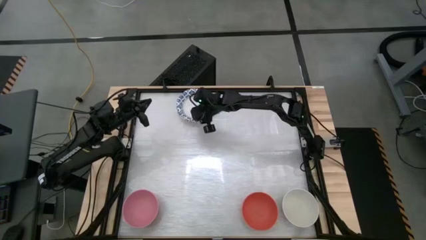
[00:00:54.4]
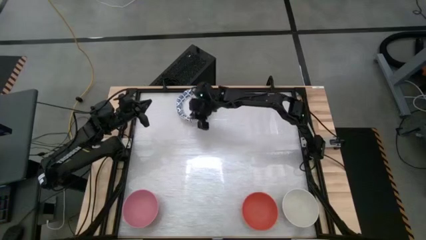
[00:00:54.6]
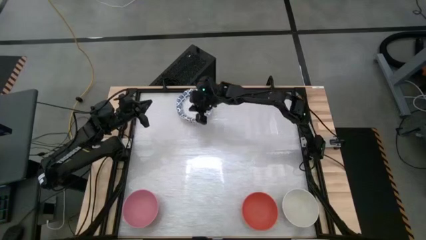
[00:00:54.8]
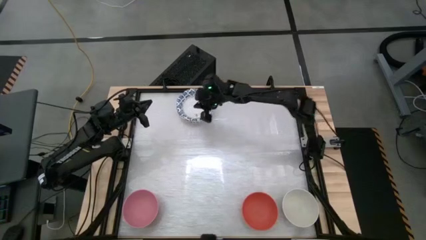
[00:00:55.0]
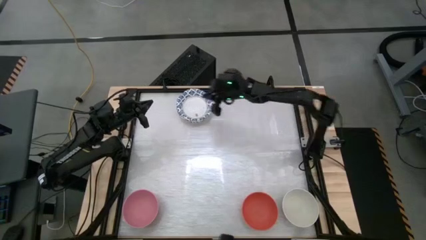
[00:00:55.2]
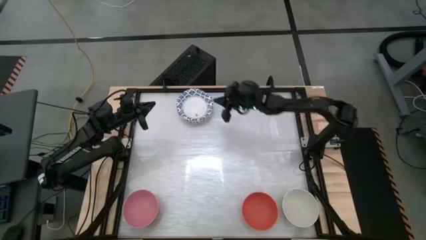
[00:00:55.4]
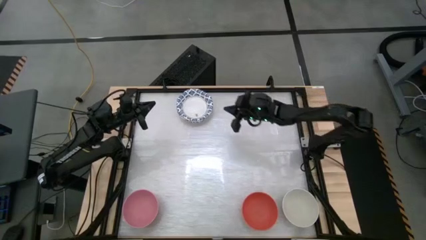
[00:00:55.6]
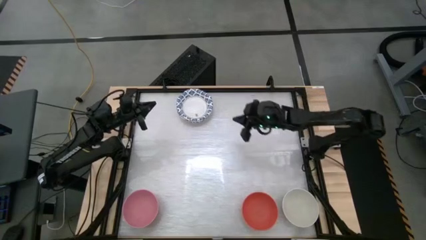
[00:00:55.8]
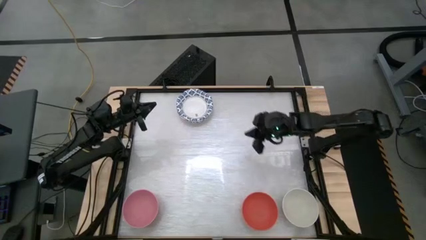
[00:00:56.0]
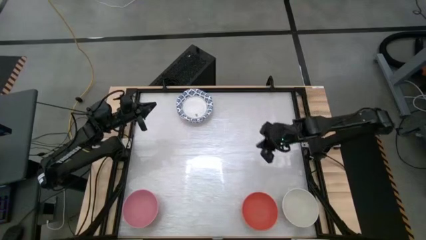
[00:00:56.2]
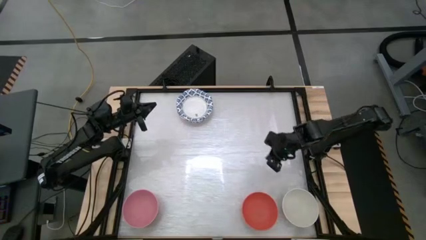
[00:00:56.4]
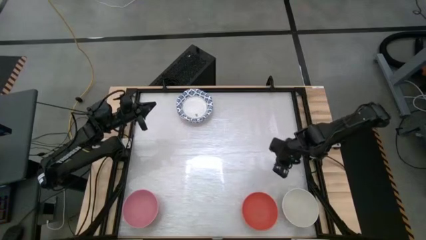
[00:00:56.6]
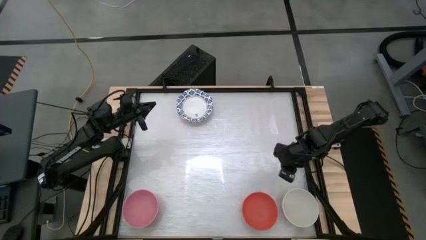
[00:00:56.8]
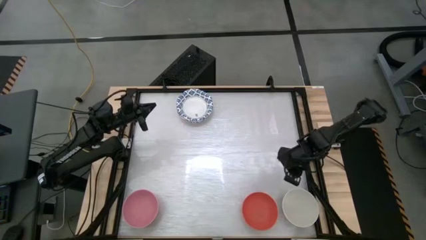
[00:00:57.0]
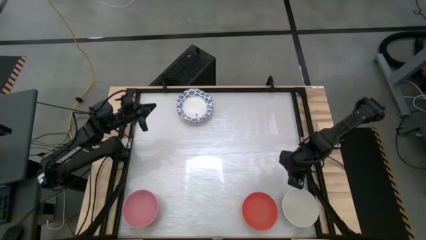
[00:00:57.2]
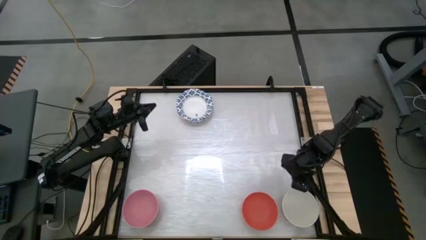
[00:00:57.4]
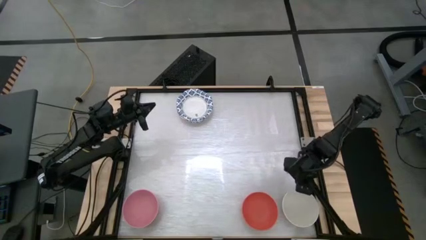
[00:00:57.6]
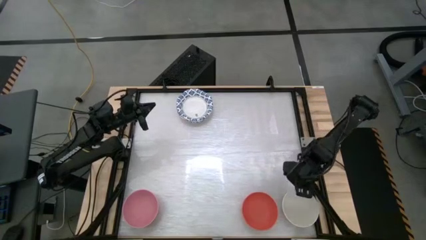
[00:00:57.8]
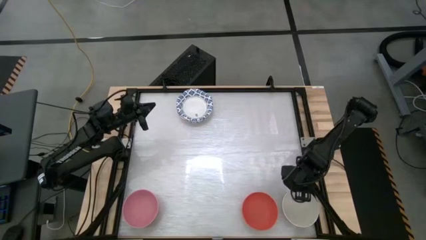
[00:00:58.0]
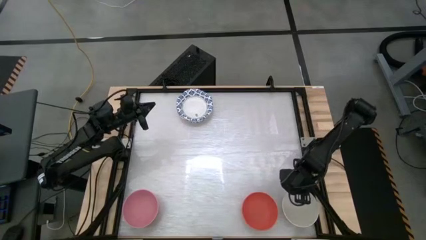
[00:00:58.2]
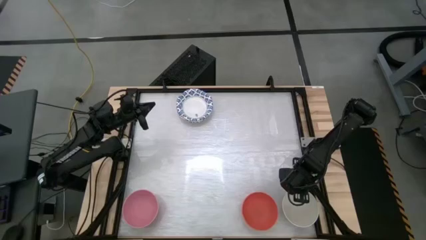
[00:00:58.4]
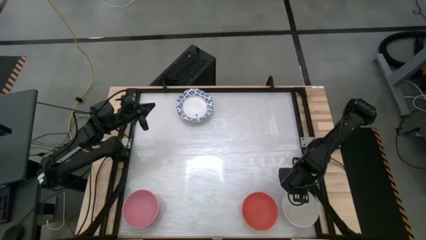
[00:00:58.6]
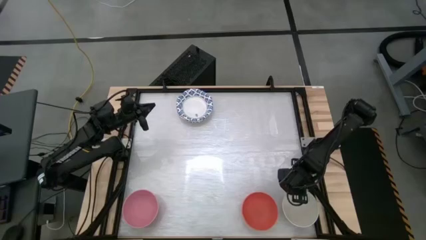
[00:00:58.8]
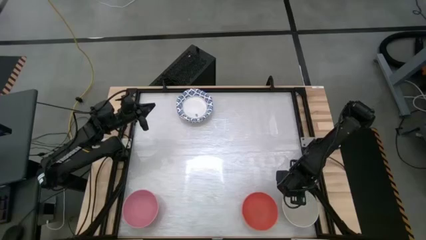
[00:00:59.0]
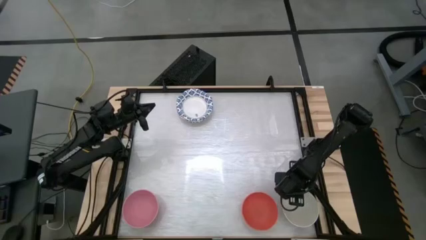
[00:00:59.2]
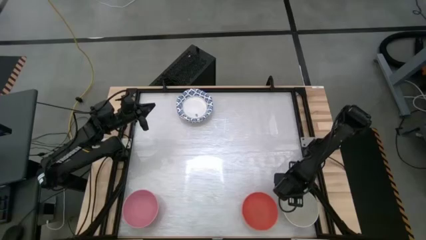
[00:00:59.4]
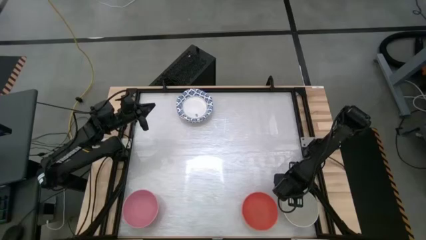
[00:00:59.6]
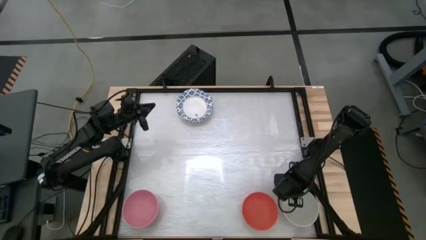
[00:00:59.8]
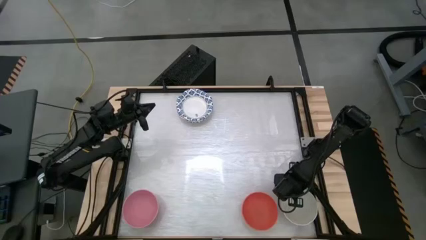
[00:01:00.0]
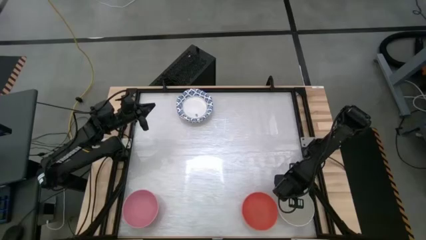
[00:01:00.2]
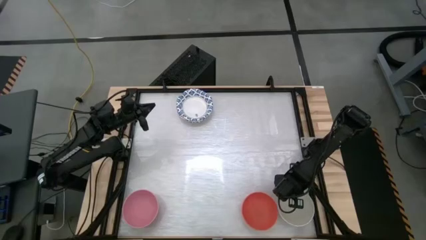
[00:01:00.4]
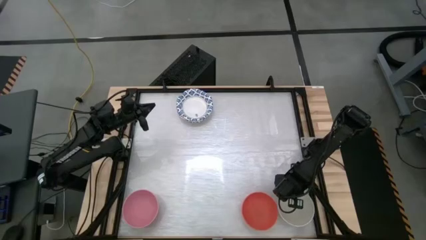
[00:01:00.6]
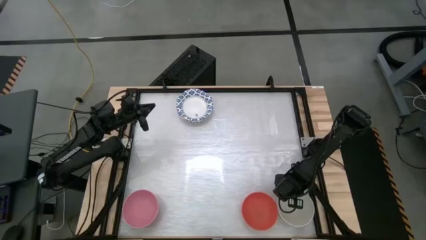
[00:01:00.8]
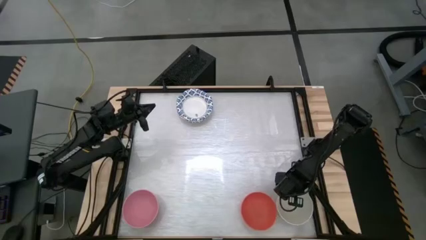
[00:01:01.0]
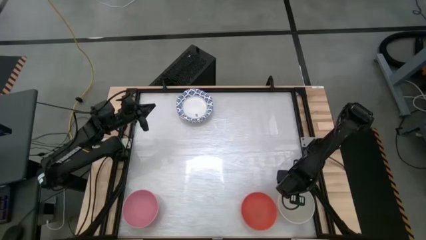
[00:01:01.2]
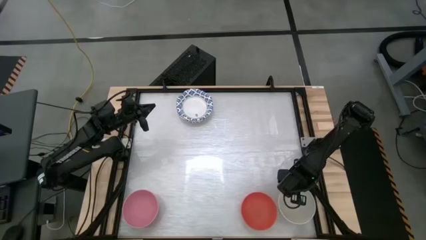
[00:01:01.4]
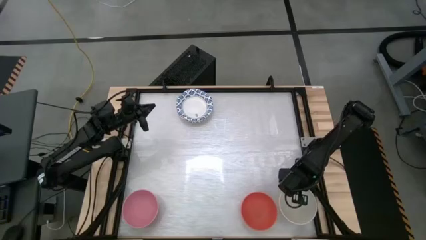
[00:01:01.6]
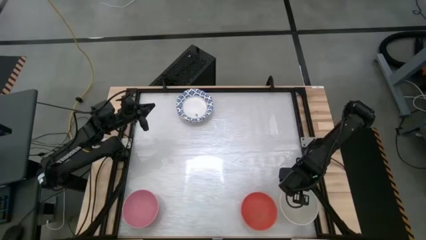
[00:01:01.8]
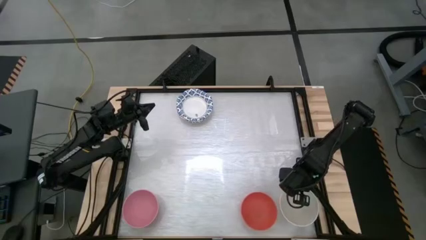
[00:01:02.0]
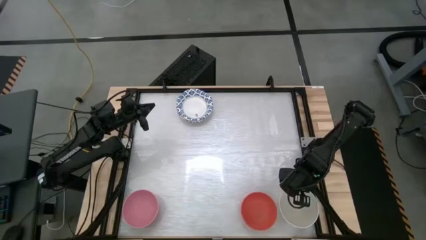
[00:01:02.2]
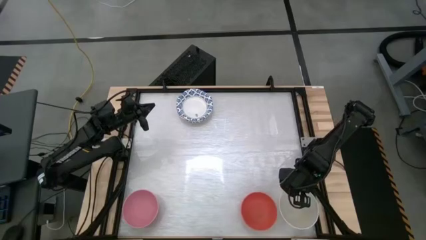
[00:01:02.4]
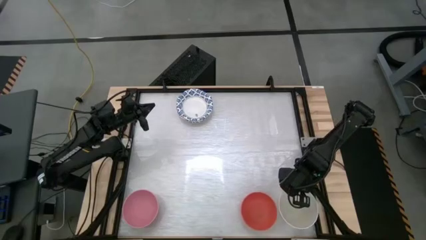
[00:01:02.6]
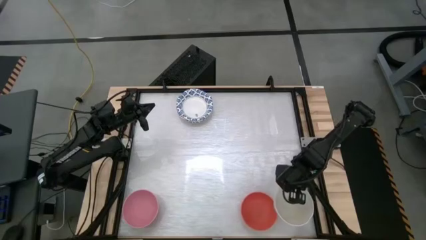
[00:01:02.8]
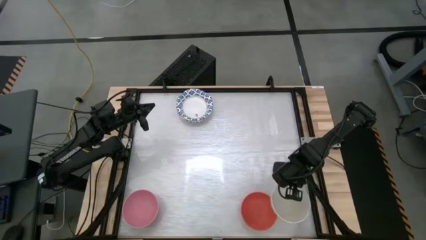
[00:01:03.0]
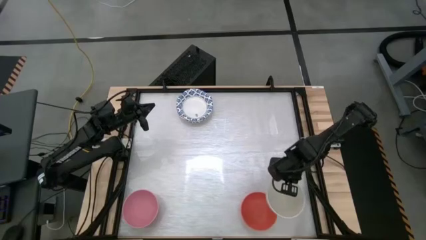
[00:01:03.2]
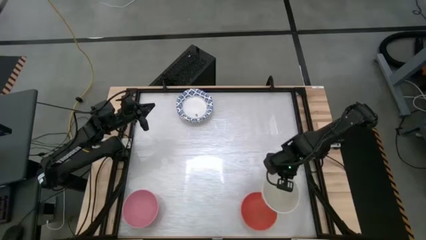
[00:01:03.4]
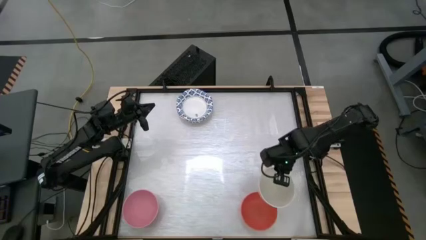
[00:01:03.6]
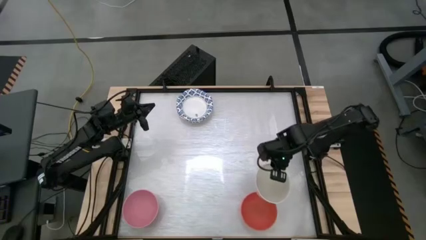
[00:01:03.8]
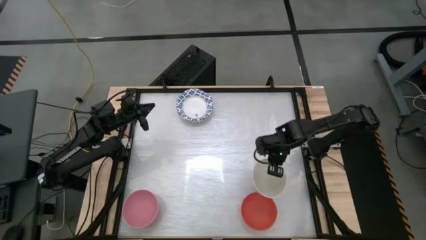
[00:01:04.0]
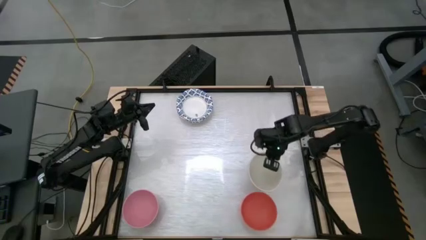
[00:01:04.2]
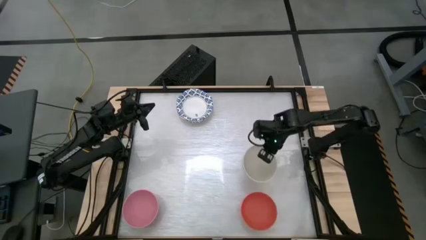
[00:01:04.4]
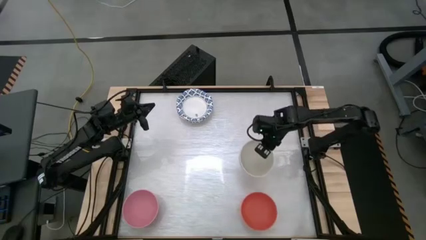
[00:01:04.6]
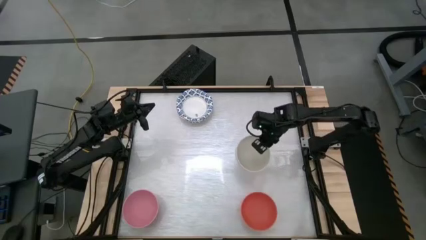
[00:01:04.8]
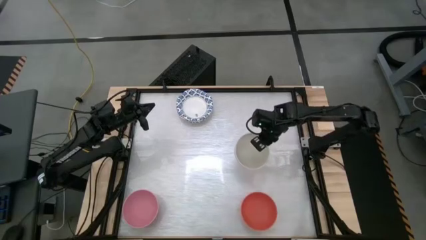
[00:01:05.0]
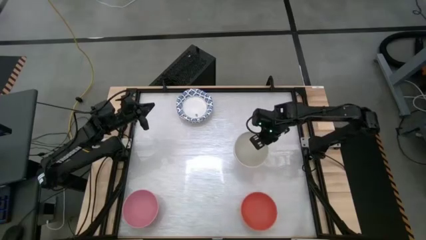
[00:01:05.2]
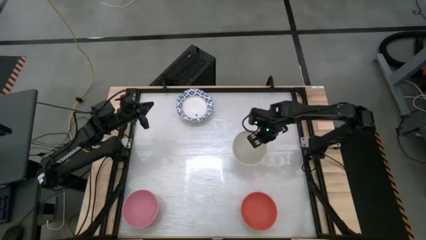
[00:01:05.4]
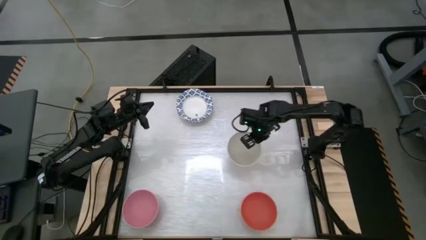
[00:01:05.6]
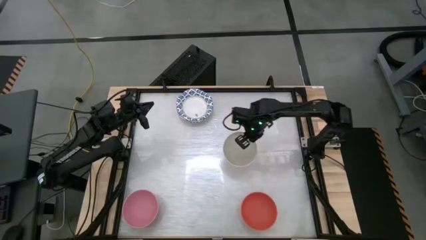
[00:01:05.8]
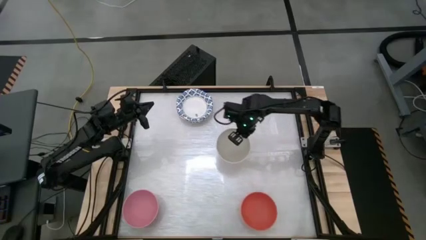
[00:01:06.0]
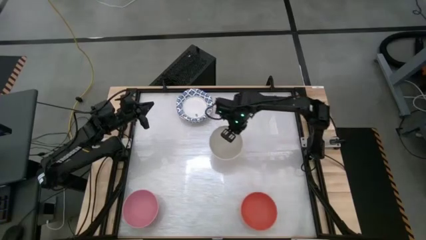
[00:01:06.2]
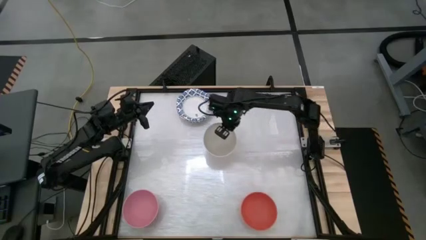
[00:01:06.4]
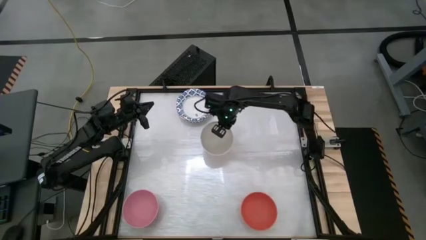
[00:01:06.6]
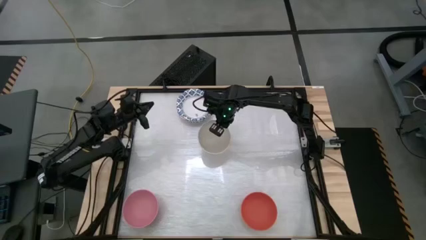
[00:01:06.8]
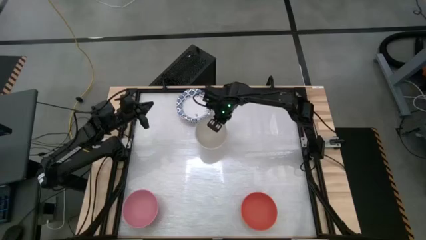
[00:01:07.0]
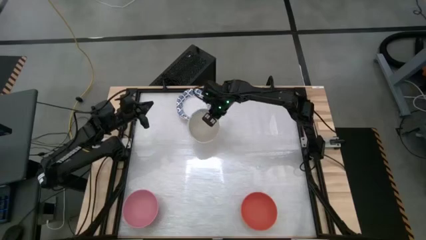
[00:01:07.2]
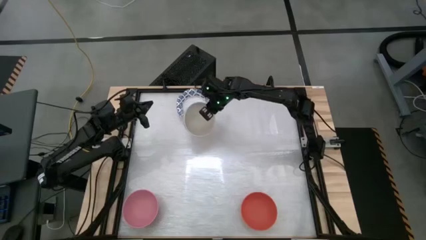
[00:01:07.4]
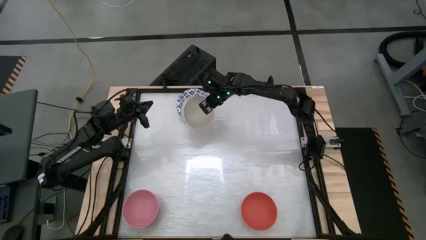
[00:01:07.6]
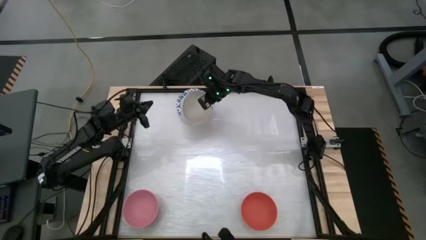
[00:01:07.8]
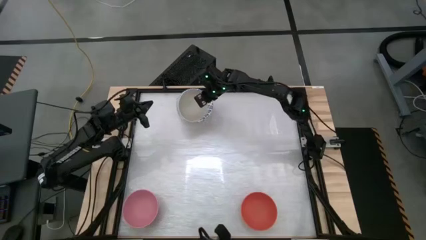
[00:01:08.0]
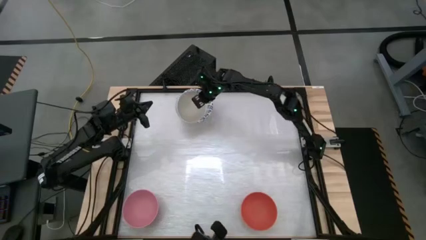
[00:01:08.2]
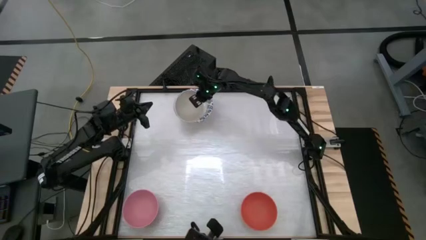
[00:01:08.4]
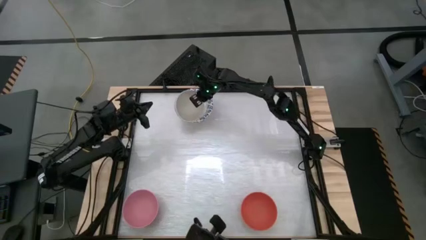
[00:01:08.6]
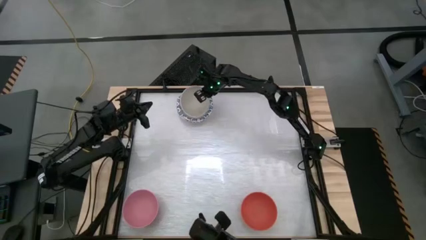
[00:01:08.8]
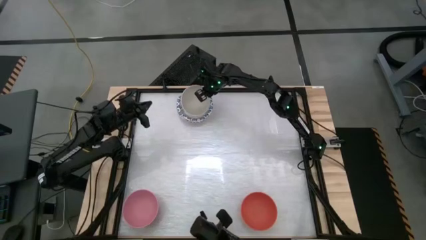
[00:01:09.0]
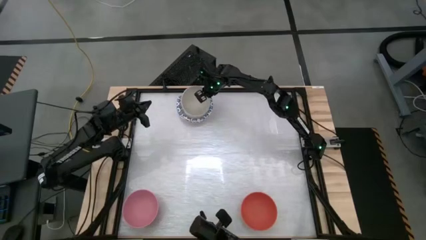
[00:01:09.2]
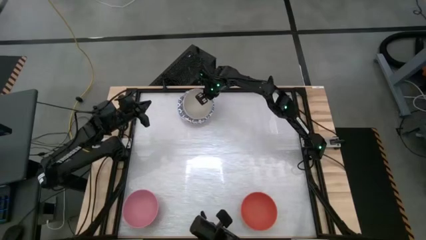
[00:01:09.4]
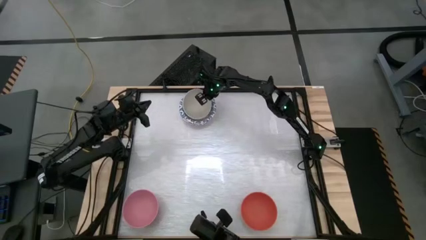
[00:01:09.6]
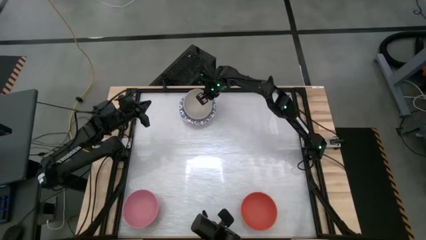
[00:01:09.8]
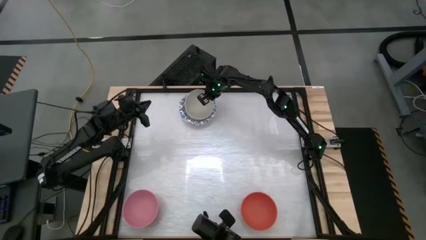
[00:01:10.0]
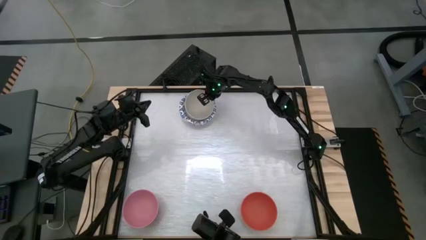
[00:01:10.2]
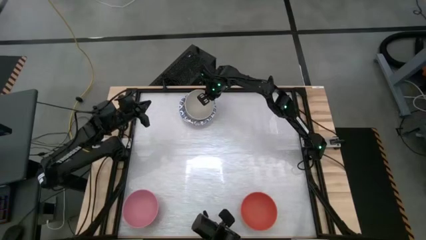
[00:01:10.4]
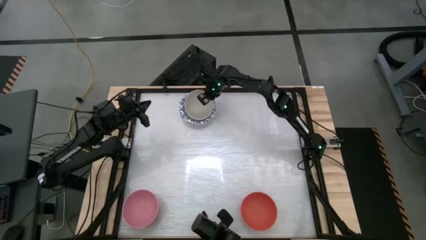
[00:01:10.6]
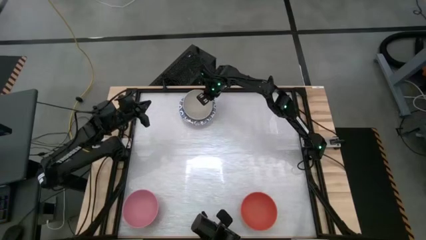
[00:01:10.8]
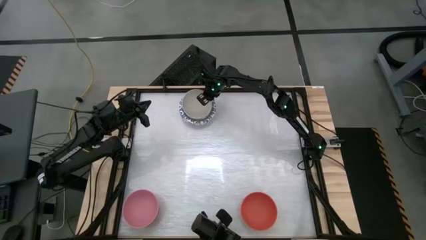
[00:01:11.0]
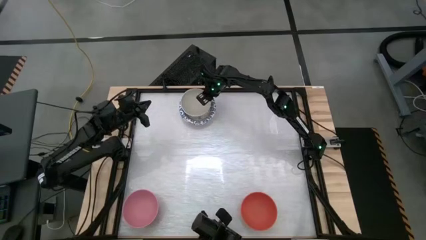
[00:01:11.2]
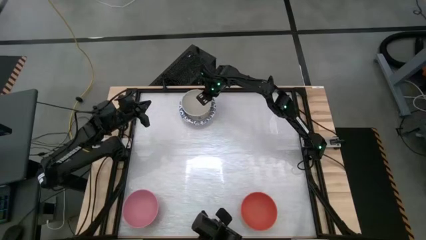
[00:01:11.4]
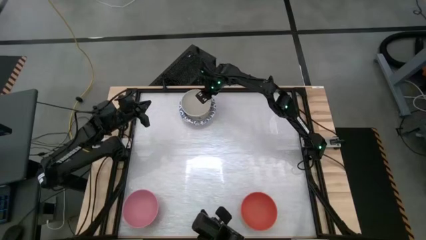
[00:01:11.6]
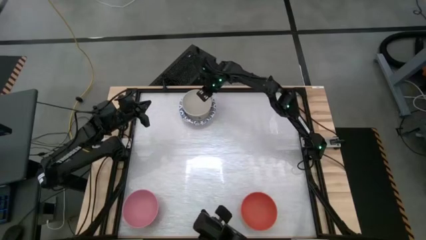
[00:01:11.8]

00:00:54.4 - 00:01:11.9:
Stack the white bowl on top of the blue patterned bowl
